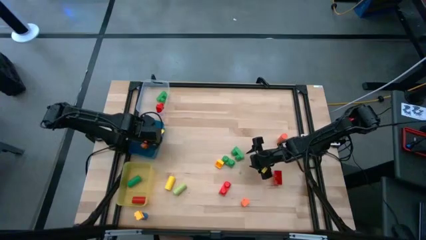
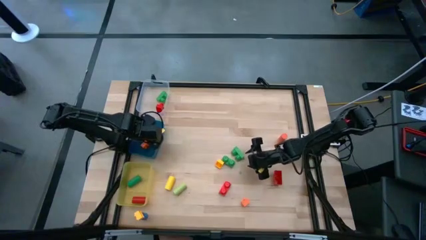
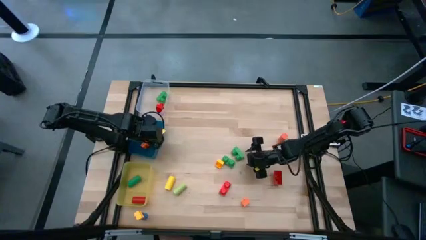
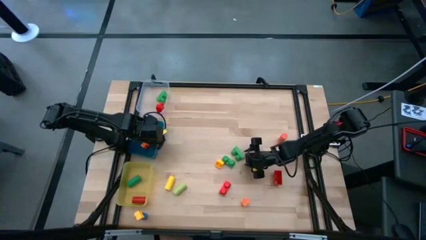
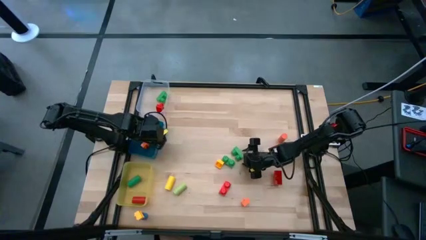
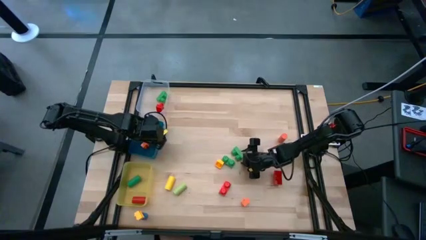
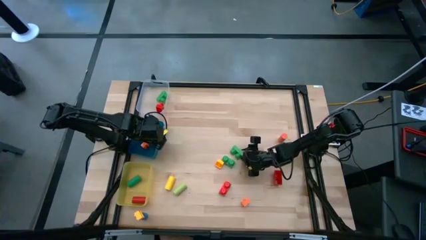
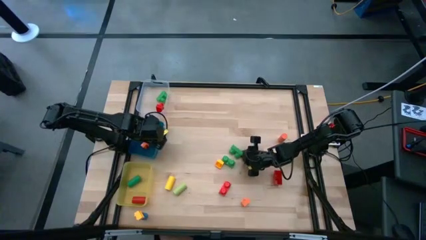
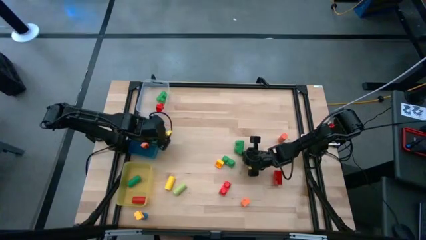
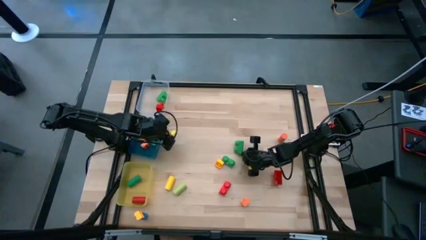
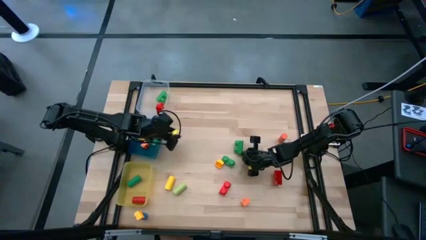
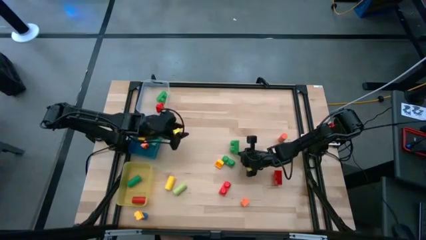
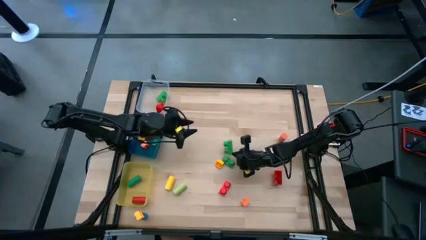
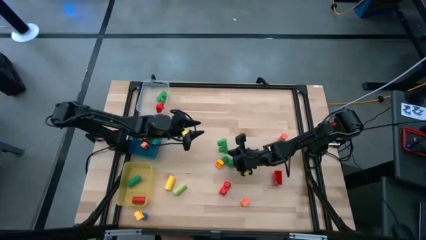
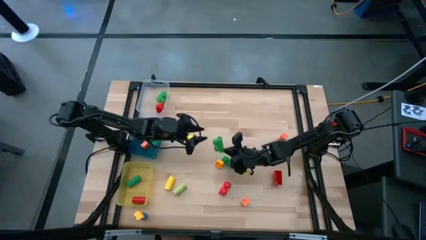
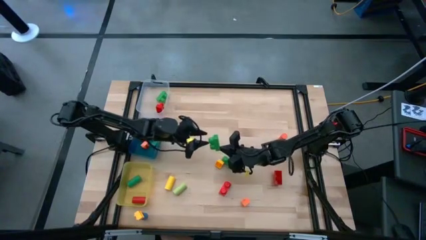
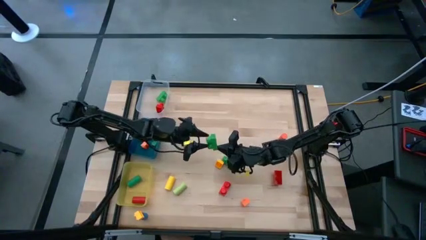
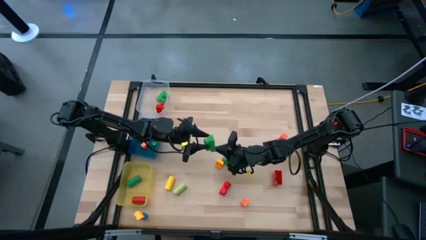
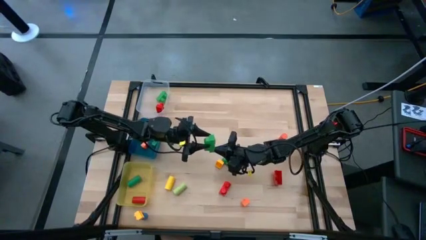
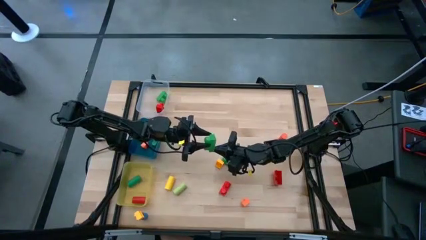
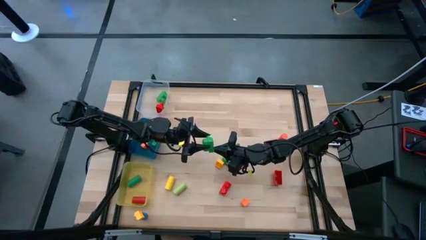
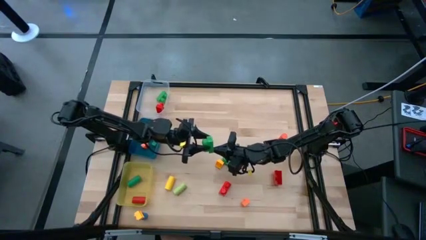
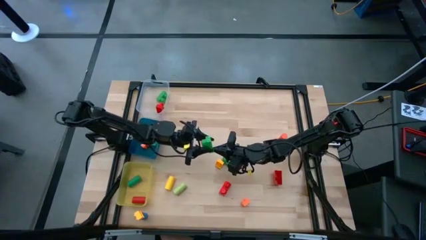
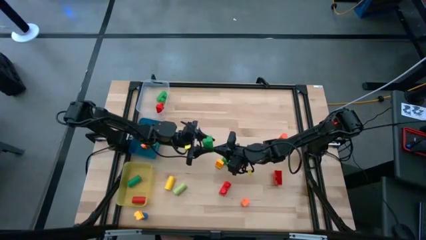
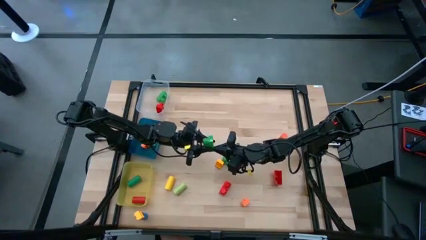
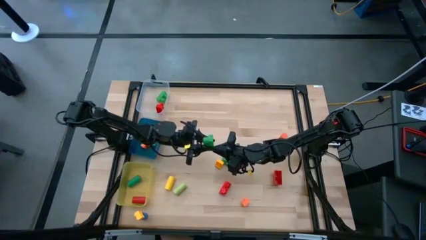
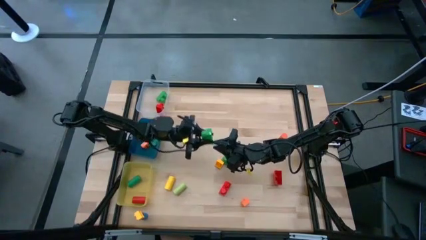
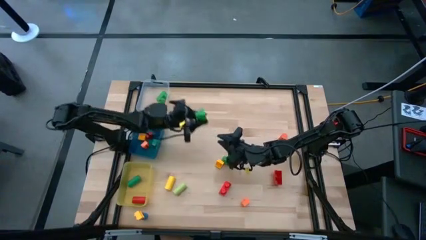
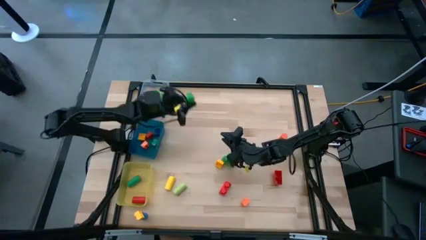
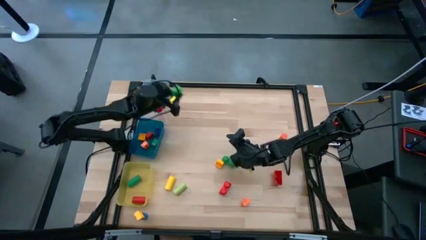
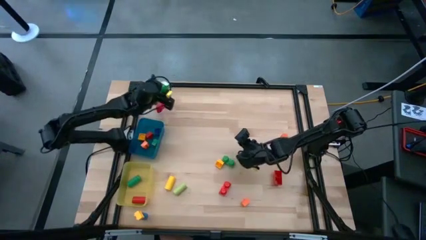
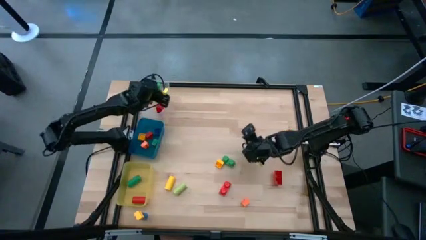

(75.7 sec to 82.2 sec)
Task: Sort blocks by size
Put the top green 2 stud game piece into the transparent bin

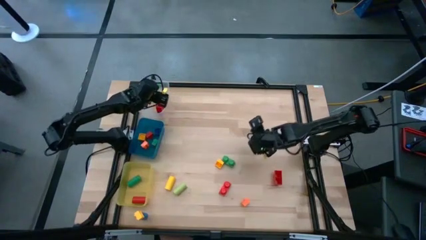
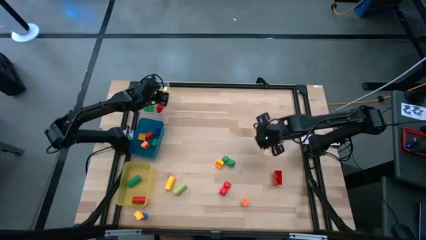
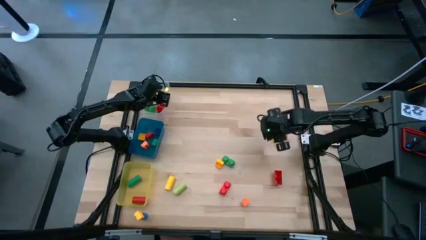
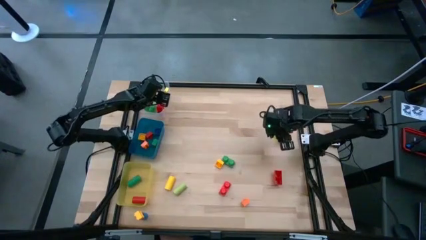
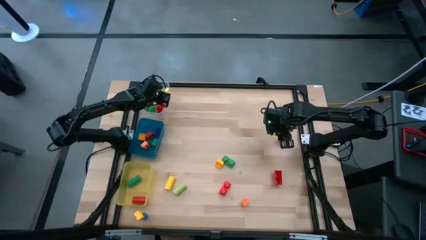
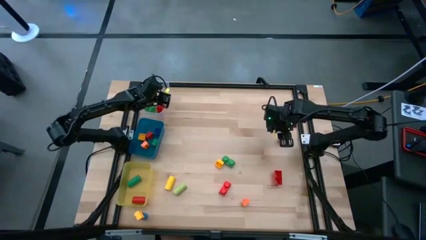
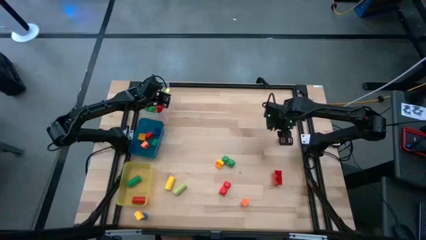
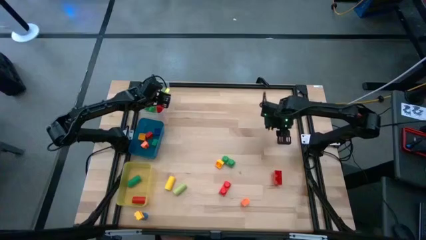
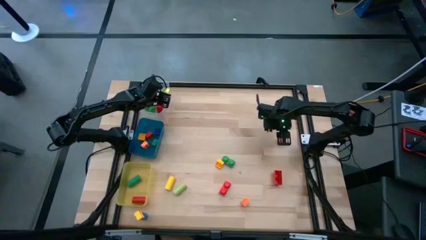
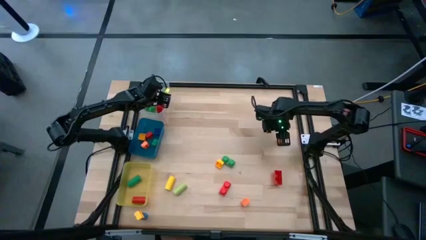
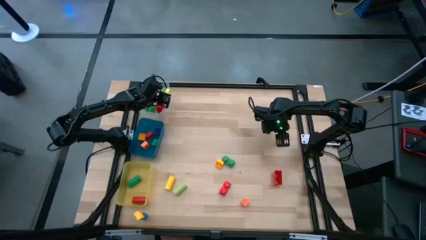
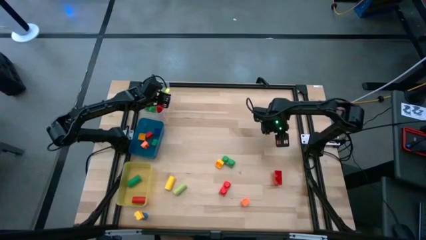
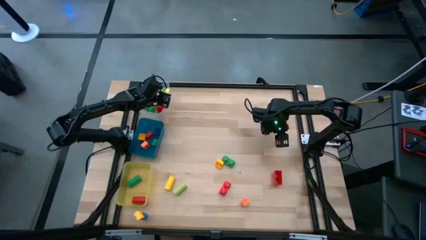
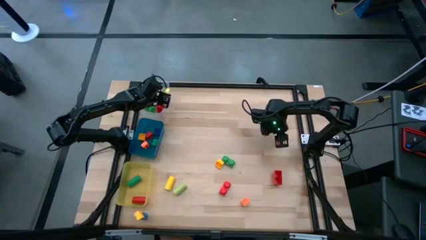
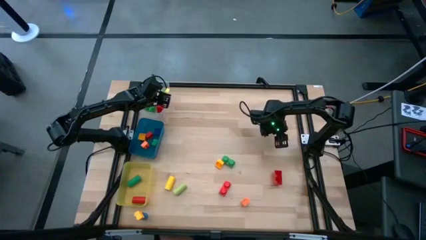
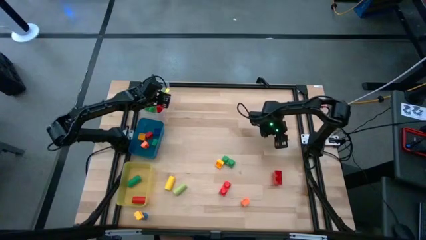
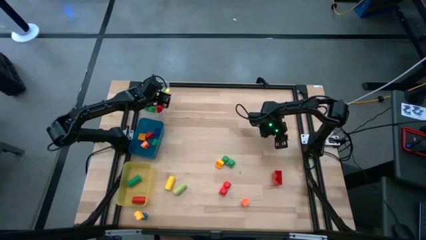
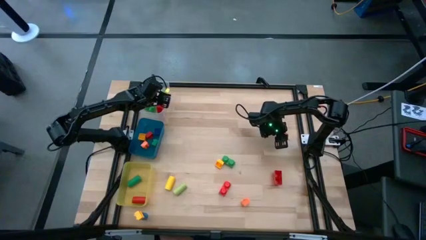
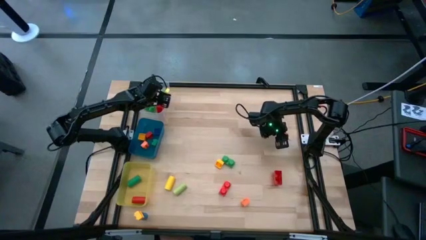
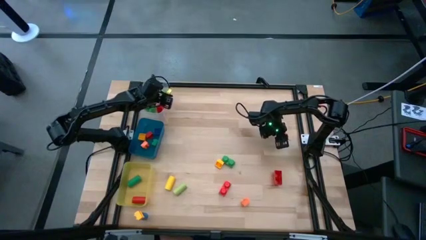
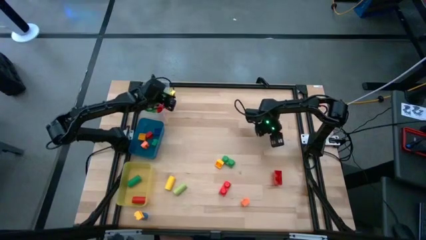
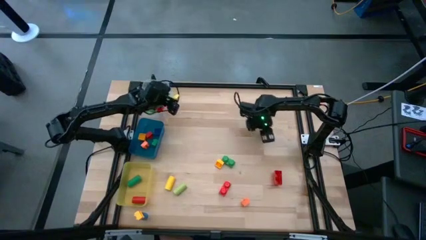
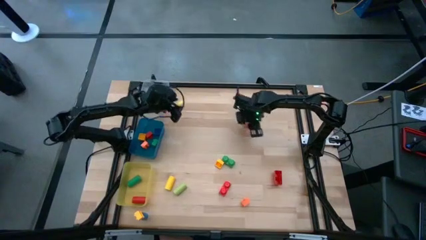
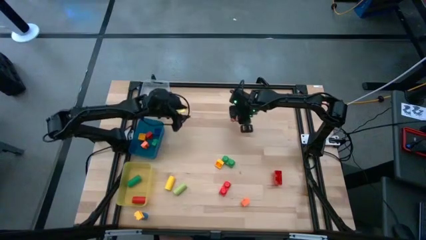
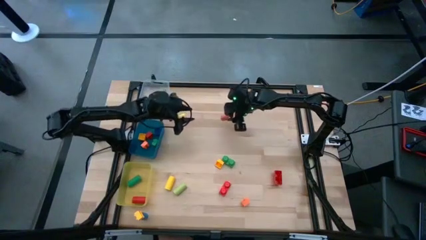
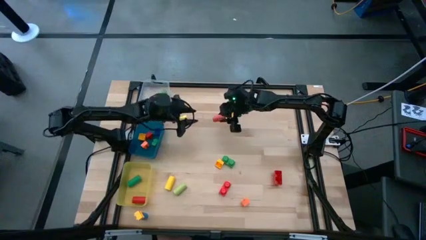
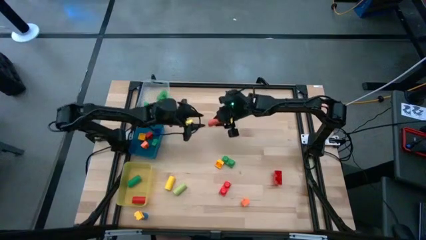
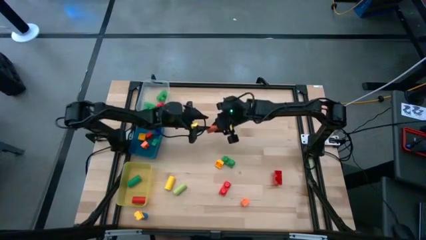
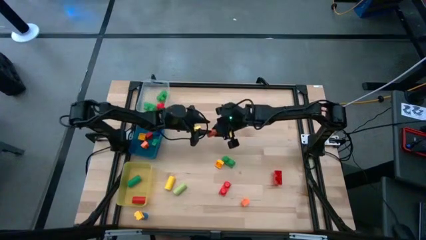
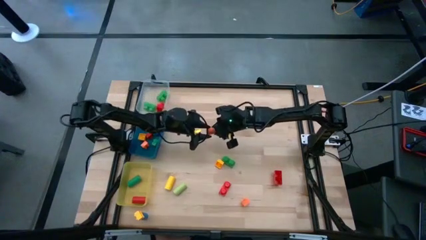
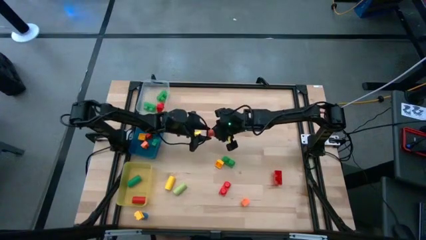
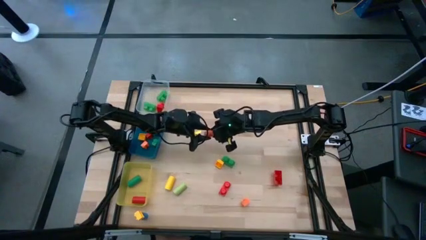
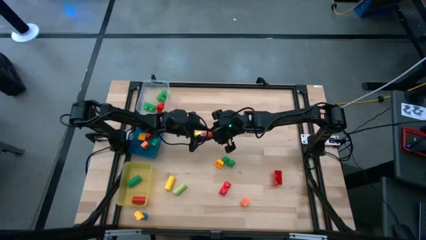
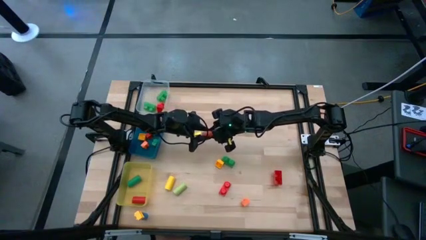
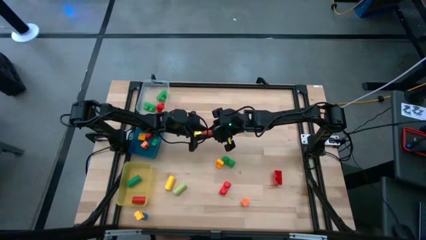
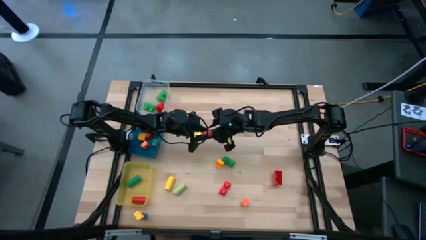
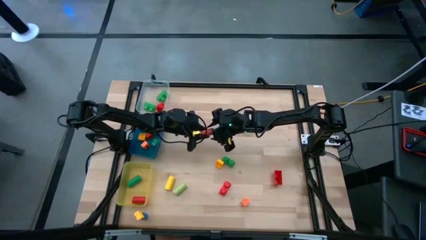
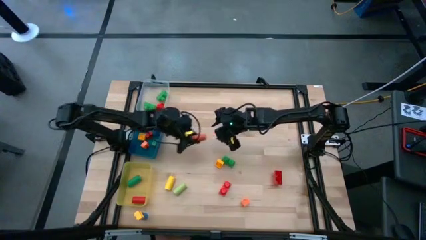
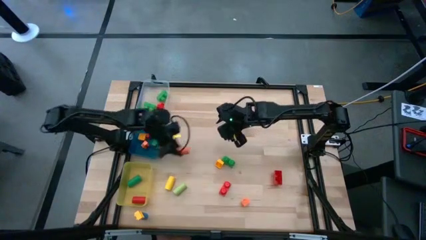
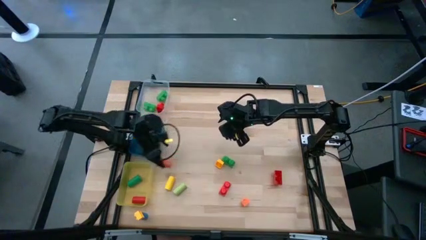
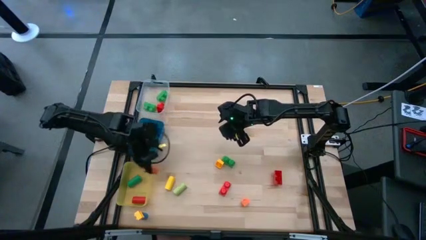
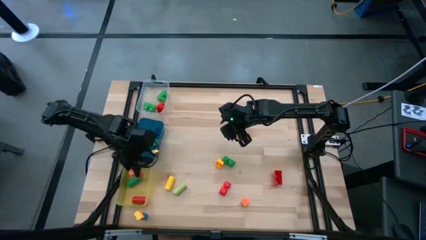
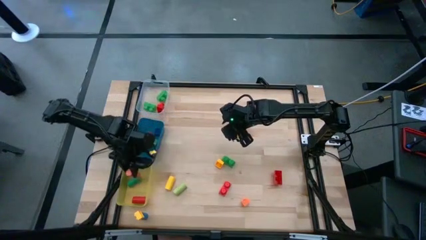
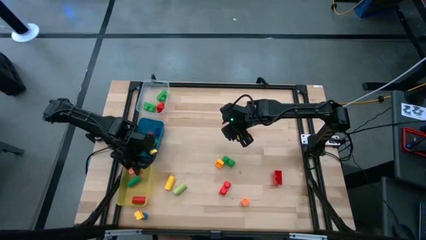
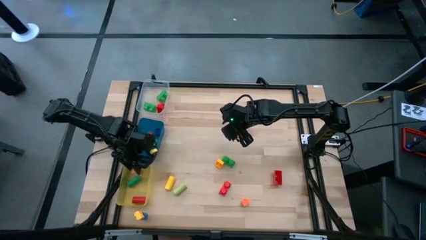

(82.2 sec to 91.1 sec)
Put the orange cylindrical block into the yellow bin

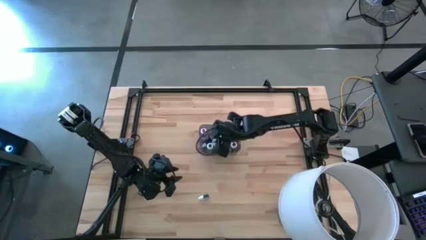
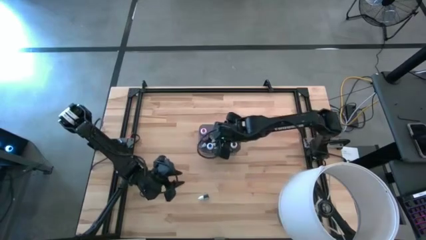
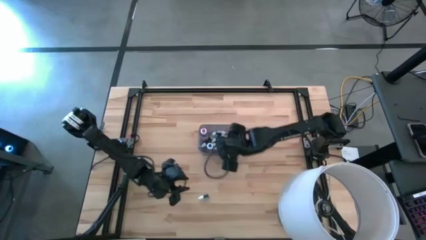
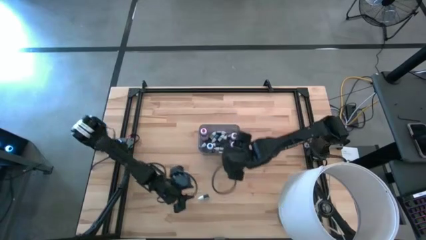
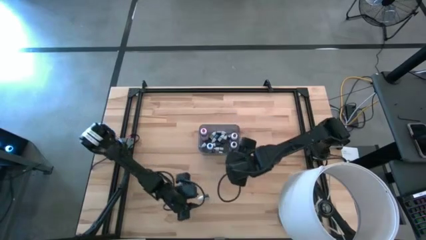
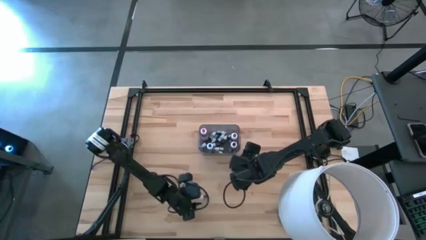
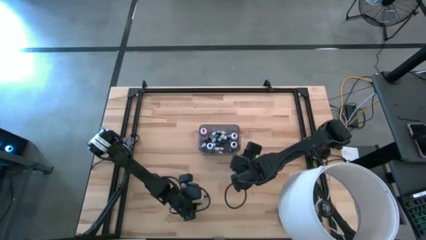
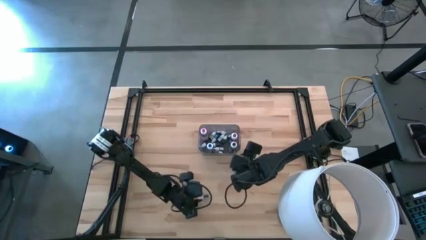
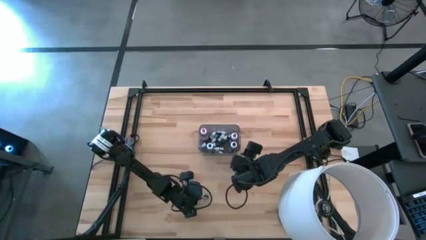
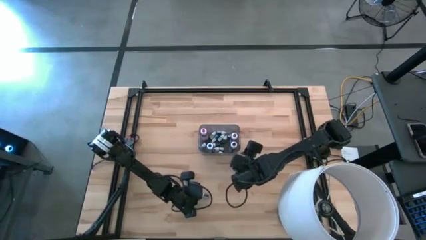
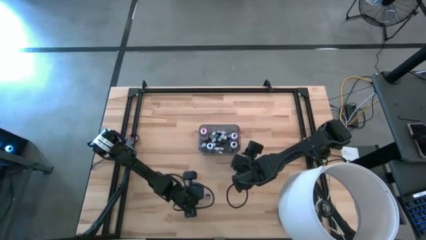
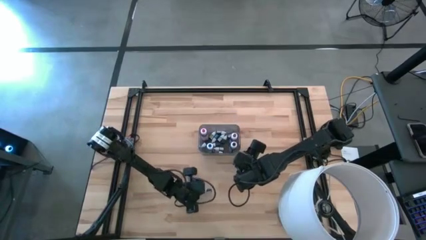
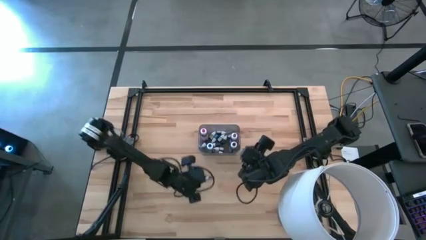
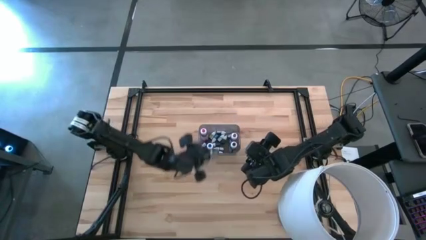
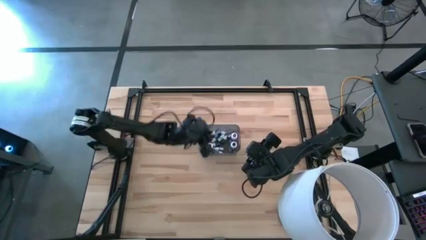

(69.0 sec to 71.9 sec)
Task: Pick & Place food coloring
Put the small black food coloring bottle in the black bin
